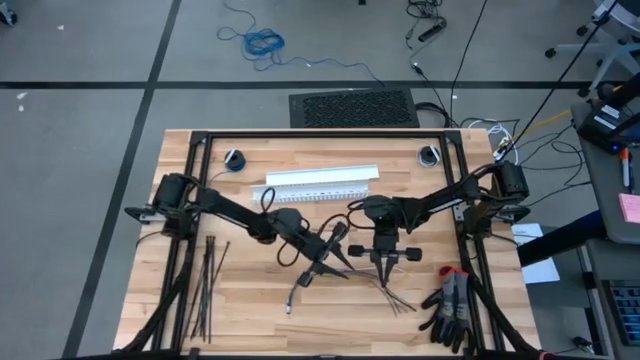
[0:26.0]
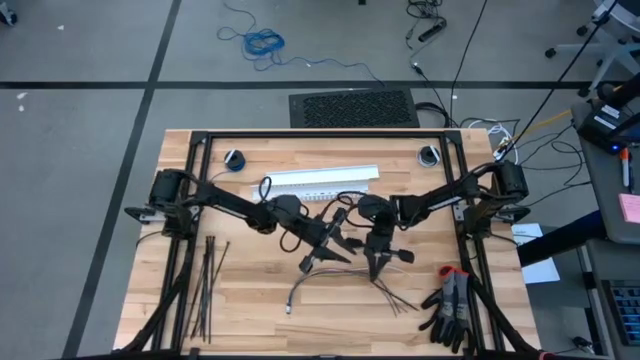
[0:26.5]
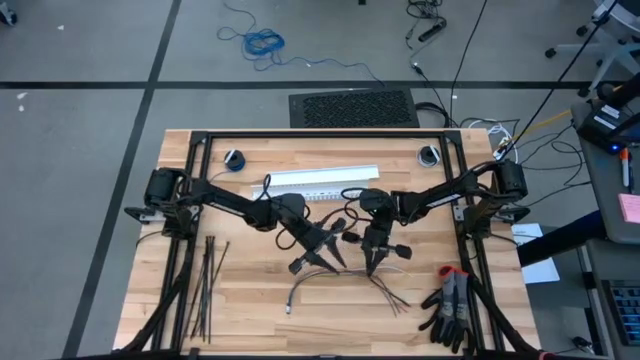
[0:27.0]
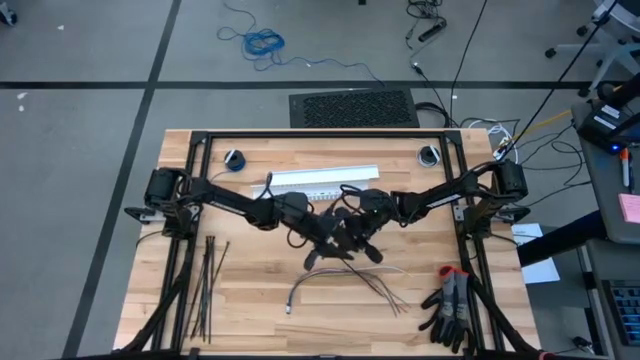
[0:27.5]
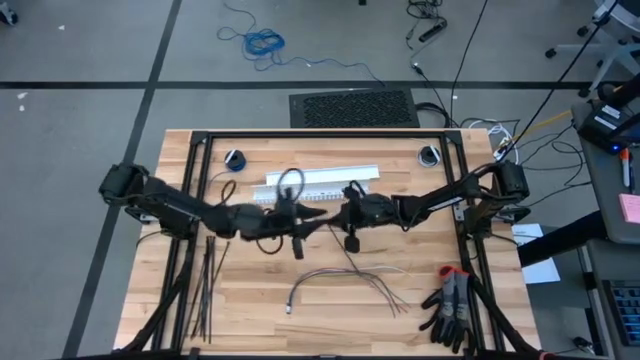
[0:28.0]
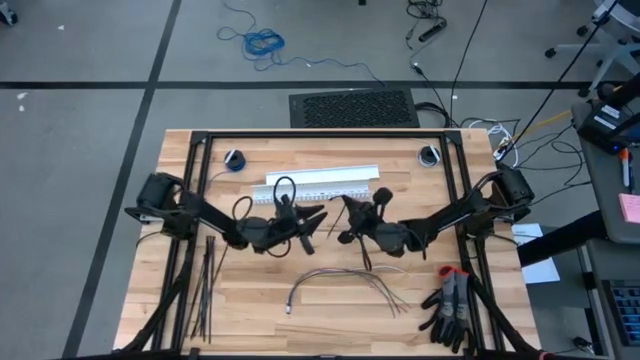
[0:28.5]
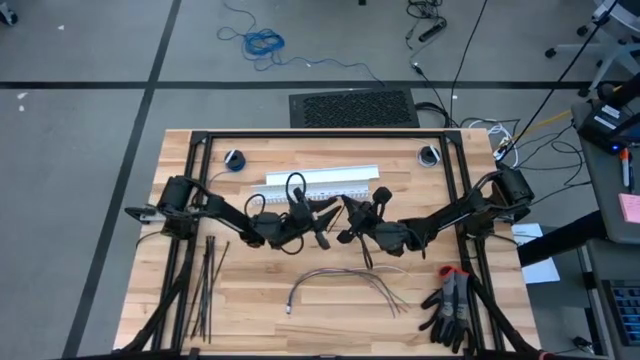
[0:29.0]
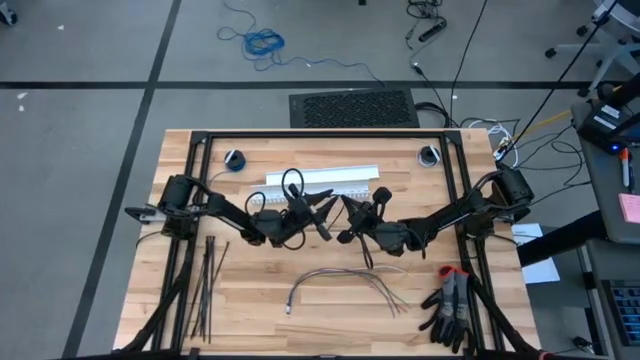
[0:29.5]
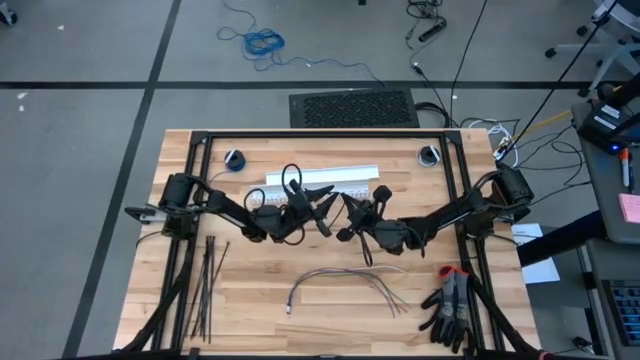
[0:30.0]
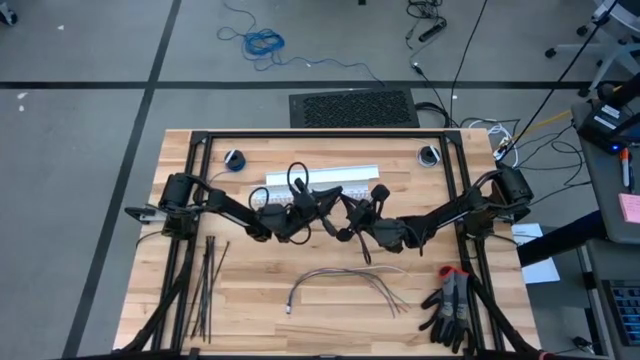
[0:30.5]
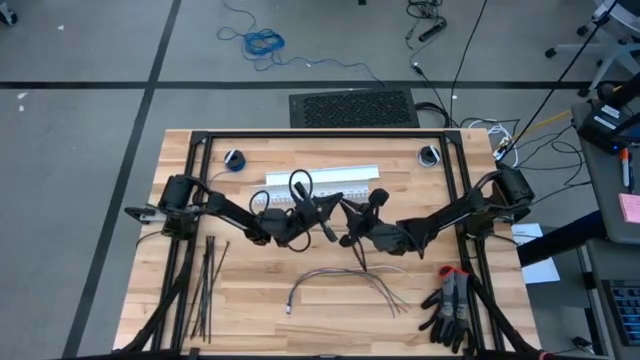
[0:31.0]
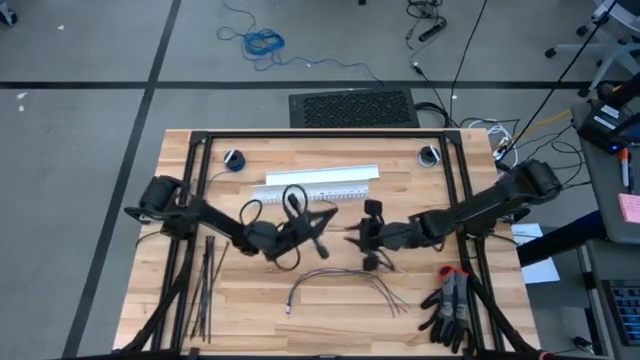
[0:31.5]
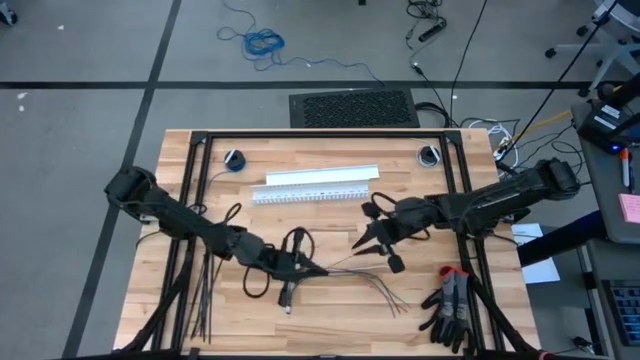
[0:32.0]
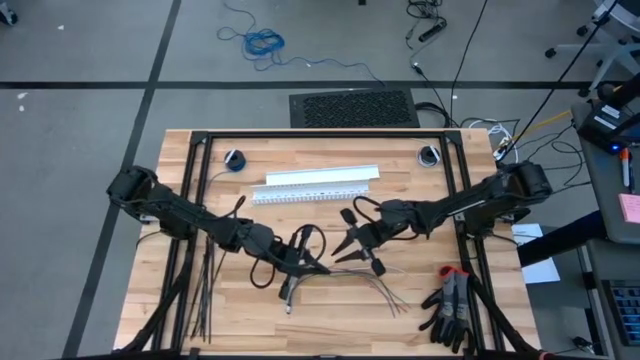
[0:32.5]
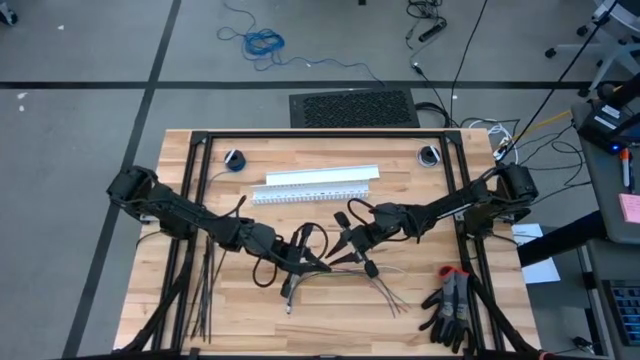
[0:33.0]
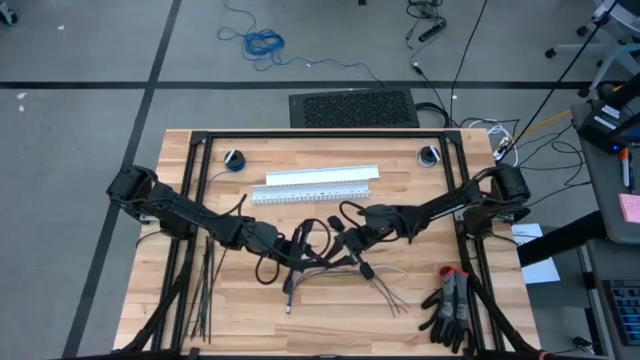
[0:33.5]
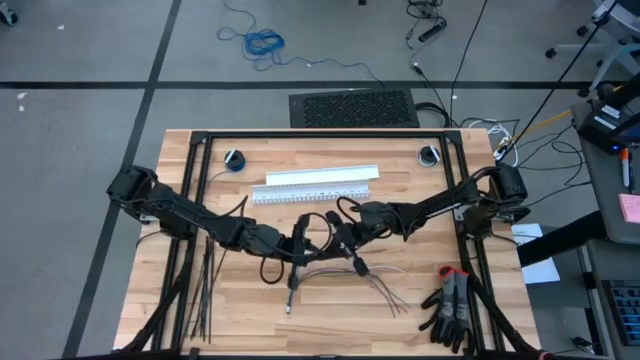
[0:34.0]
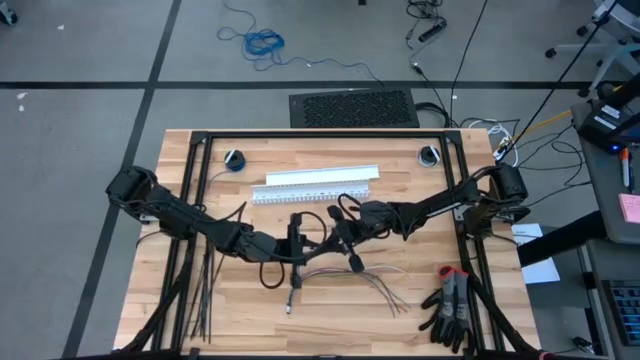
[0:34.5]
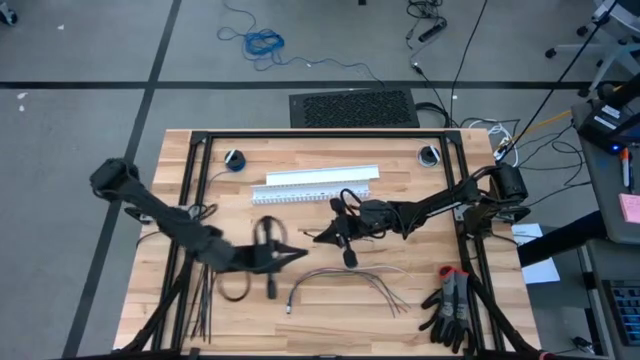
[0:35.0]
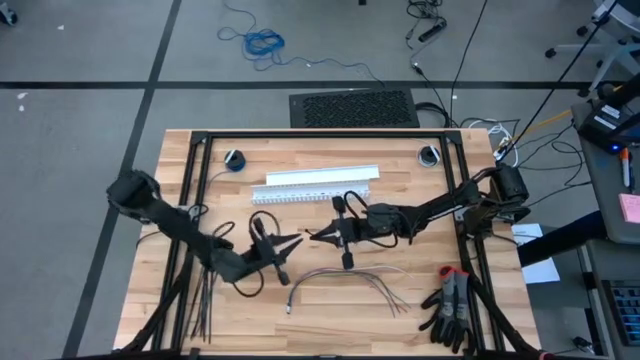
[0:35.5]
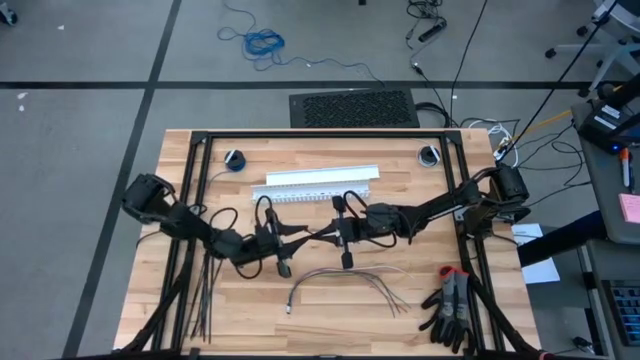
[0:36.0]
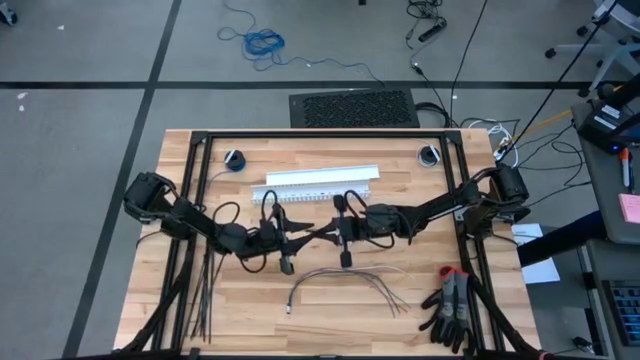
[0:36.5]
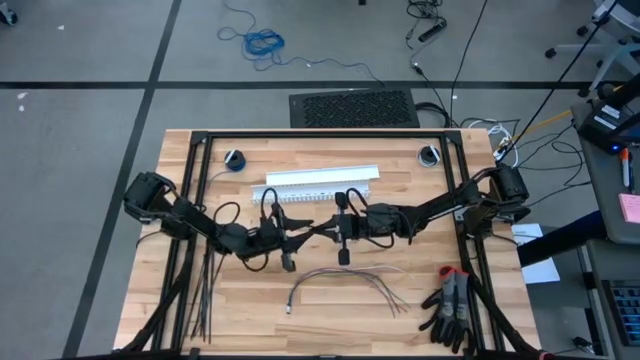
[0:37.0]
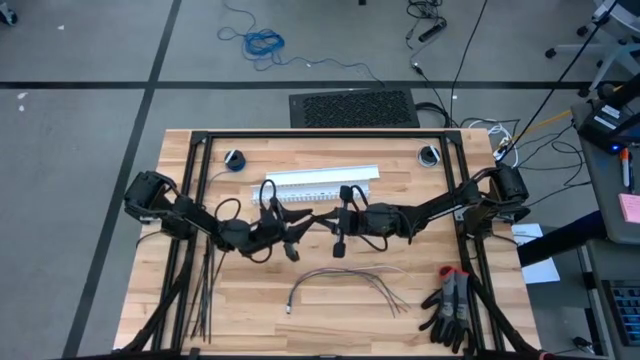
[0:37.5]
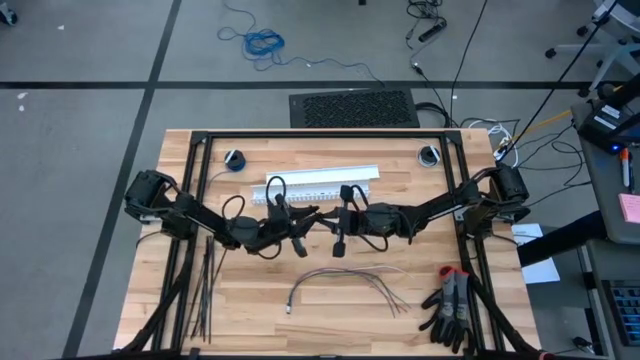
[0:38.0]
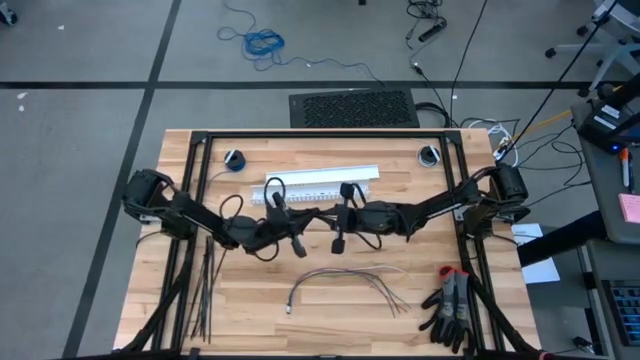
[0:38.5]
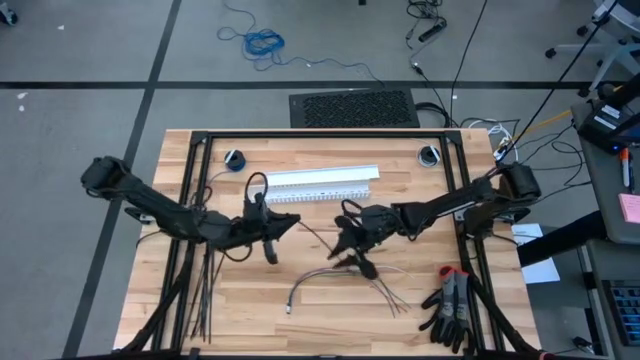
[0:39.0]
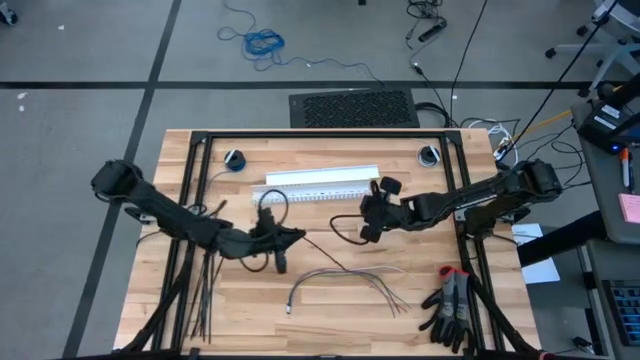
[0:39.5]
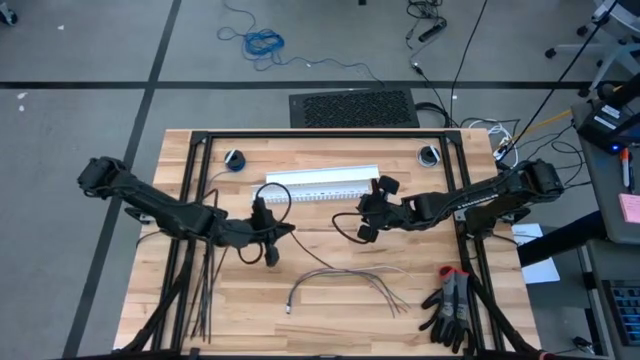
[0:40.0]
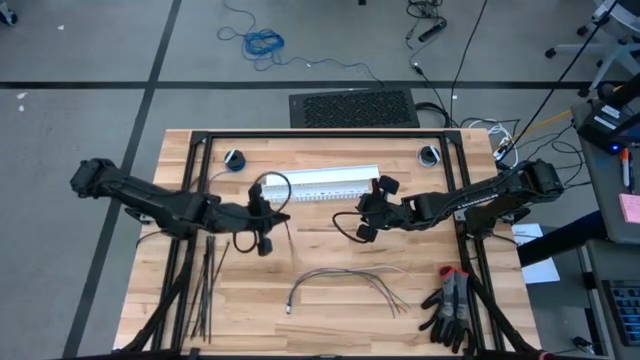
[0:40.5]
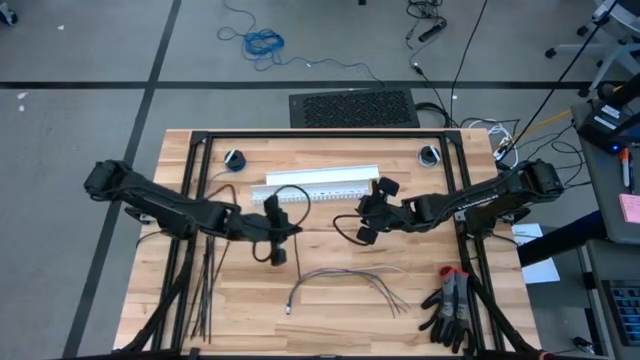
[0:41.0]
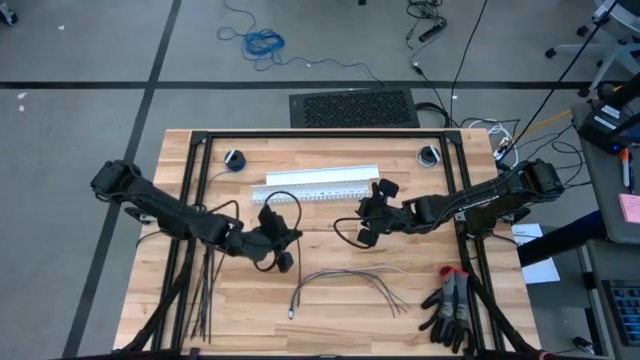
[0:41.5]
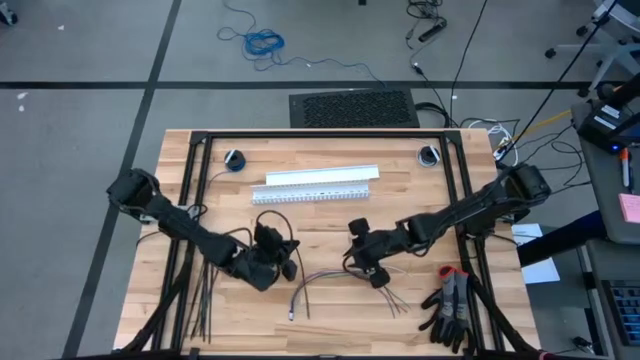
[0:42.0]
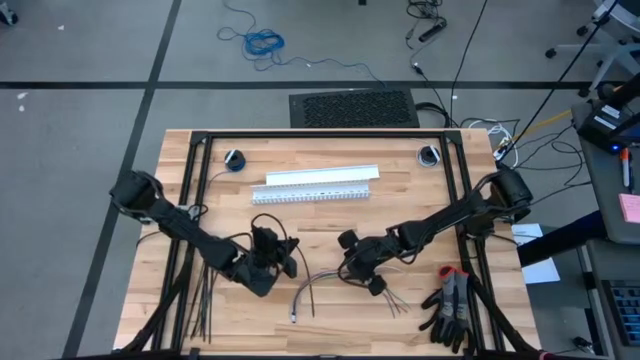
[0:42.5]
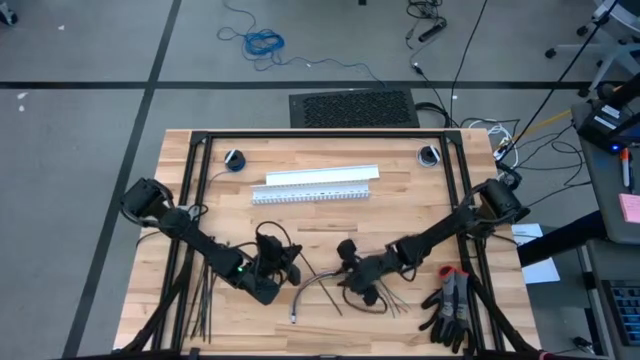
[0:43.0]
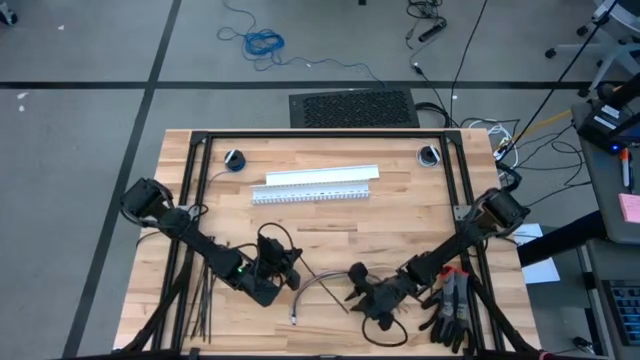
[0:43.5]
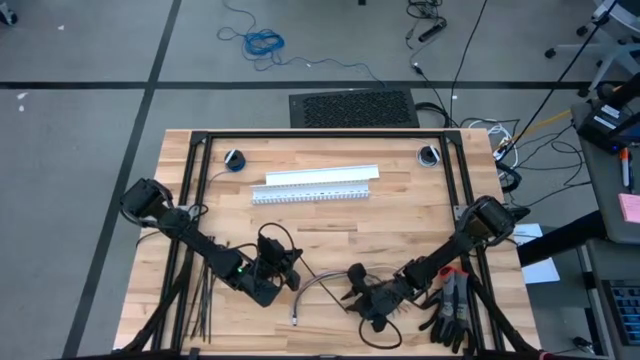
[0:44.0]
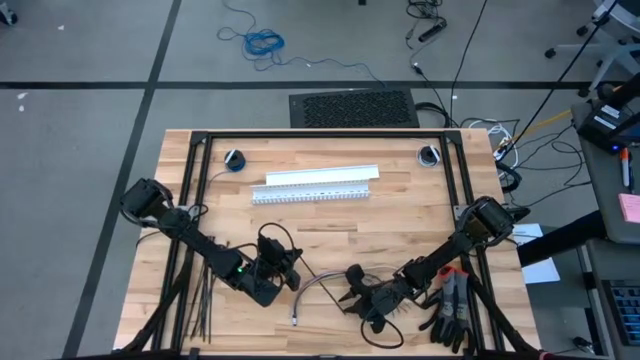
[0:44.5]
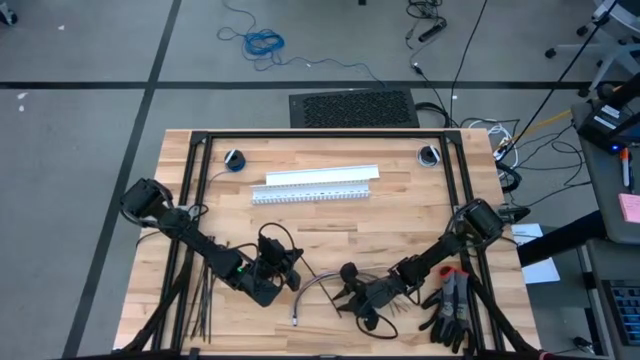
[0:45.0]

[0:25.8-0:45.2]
Task: Ziptie cables
Wrap the black zip tie on the cables
